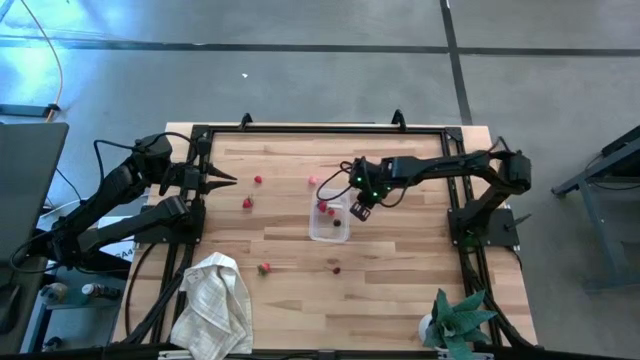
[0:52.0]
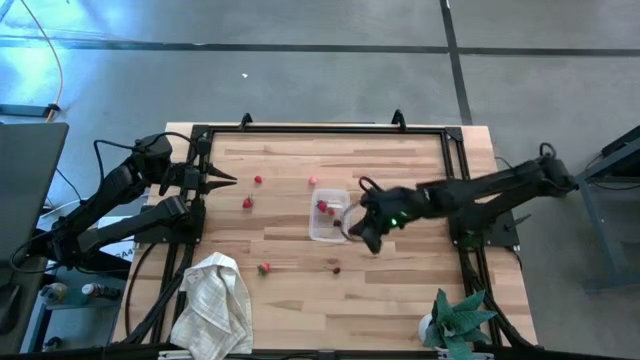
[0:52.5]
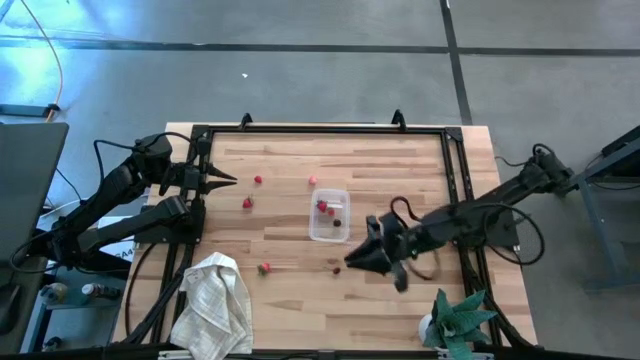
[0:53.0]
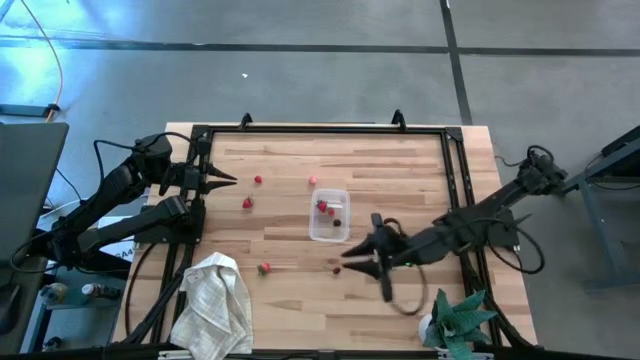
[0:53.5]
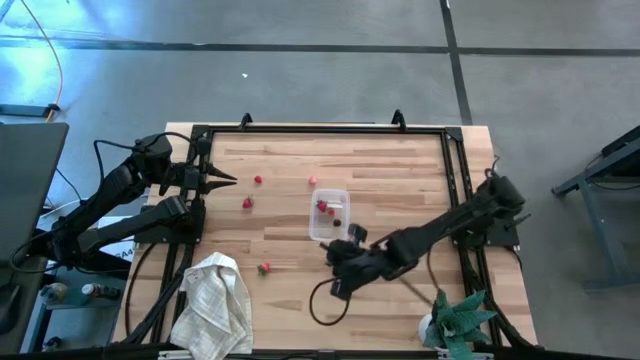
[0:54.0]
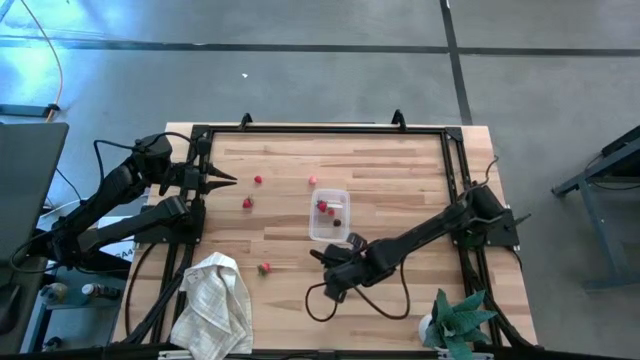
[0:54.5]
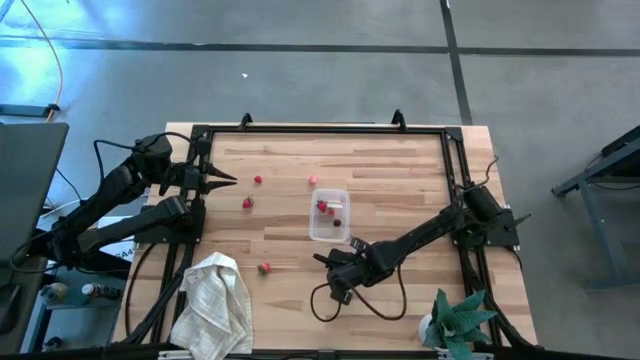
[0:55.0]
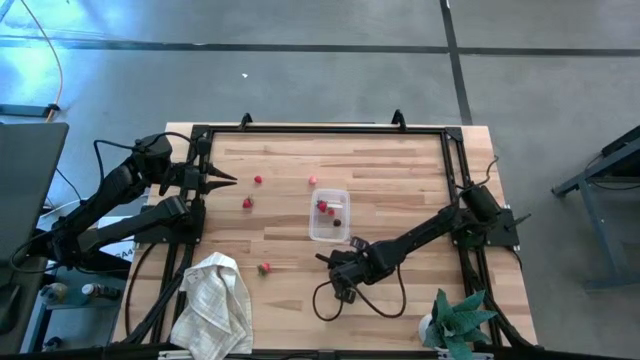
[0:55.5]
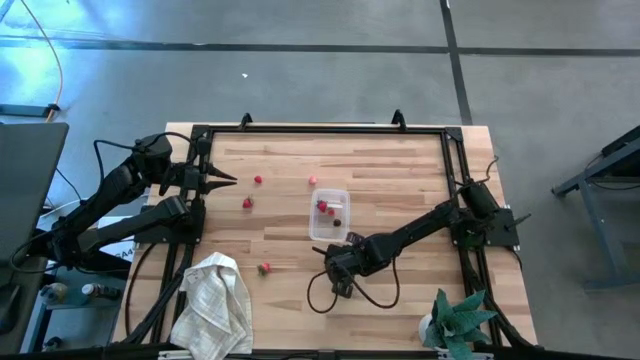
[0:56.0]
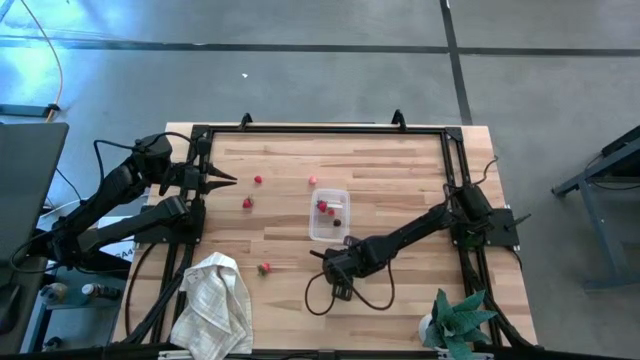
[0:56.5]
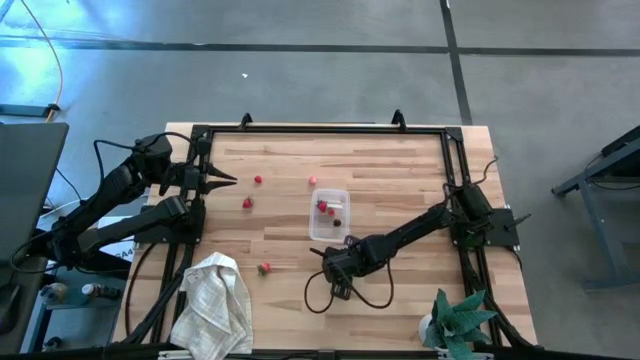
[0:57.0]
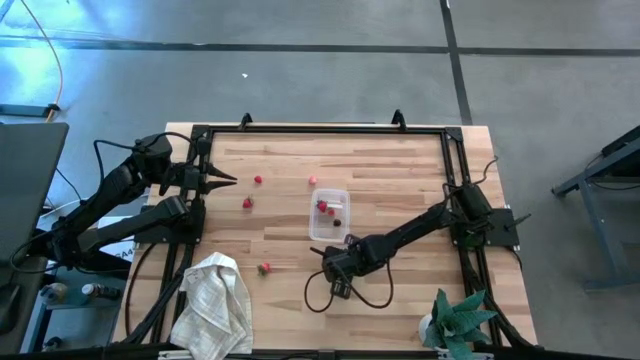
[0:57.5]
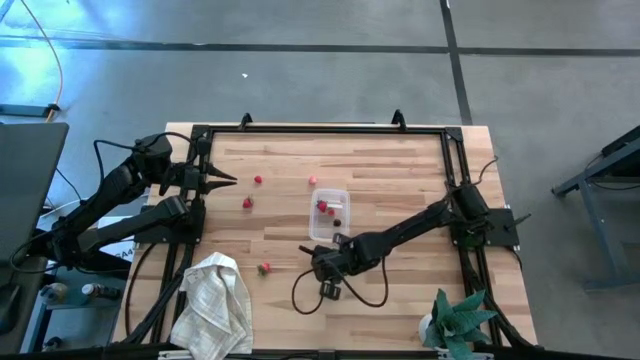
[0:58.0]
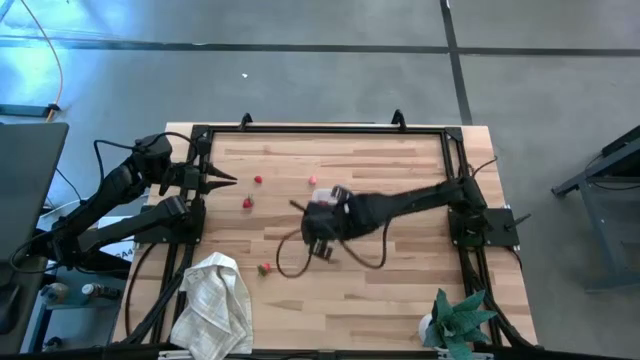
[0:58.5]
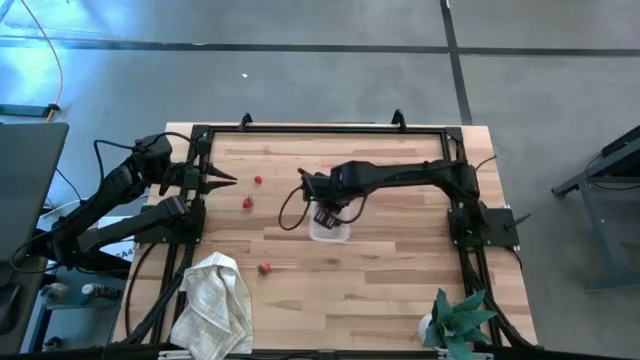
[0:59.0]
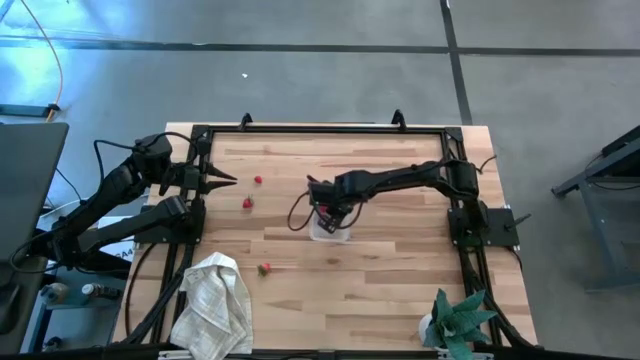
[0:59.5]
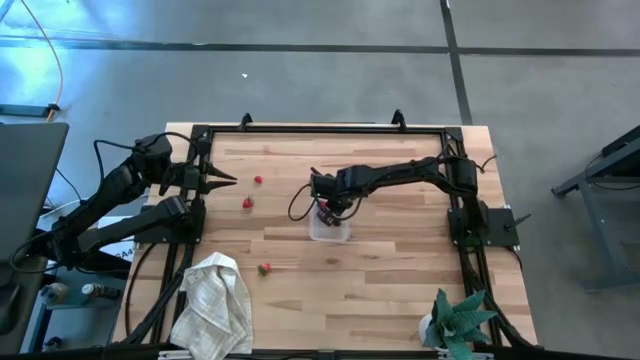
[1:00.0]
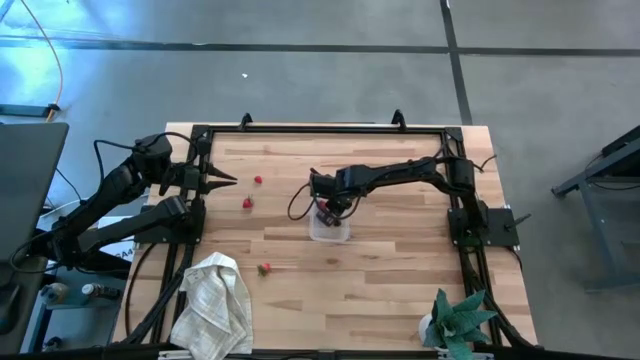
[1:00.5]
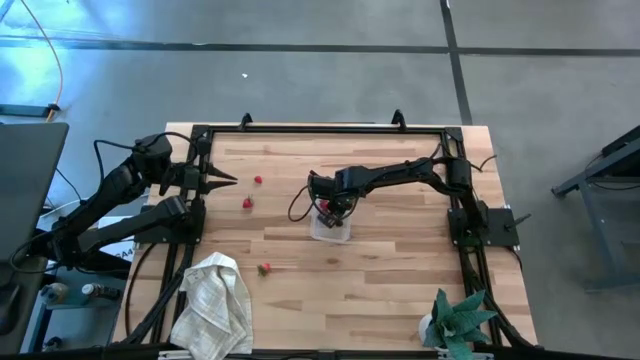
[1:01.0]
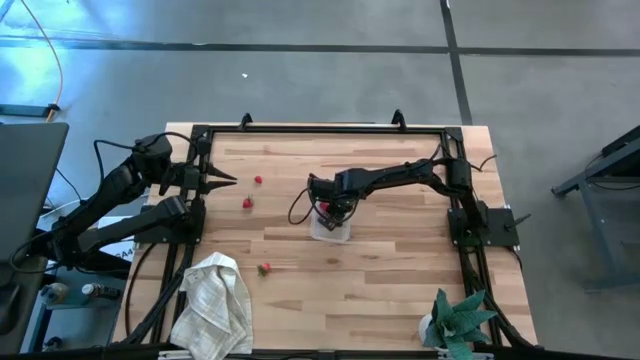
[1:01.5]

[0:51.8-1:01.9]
Task: Pick and placing Produce into tupperware
Put the red cherry into the transparent bin

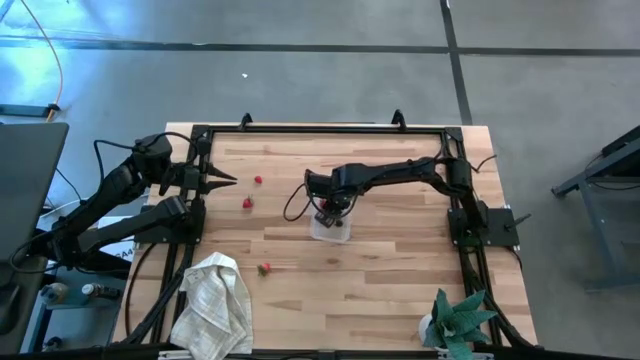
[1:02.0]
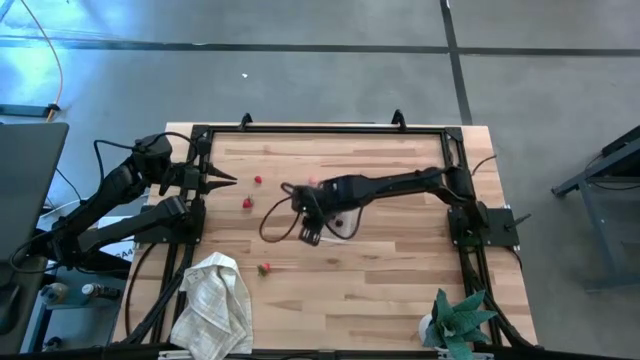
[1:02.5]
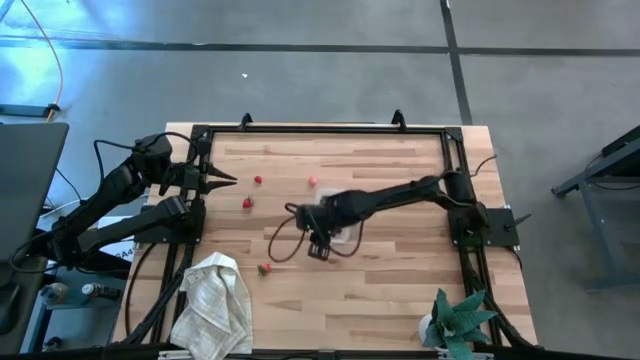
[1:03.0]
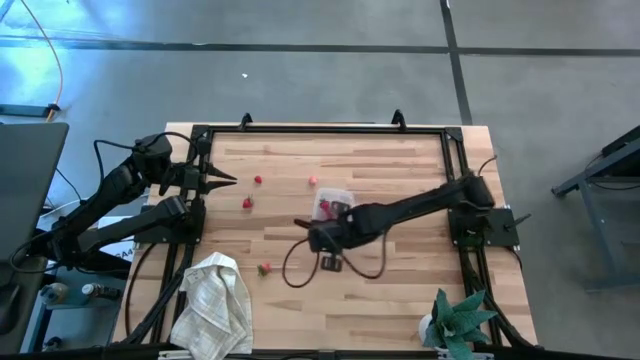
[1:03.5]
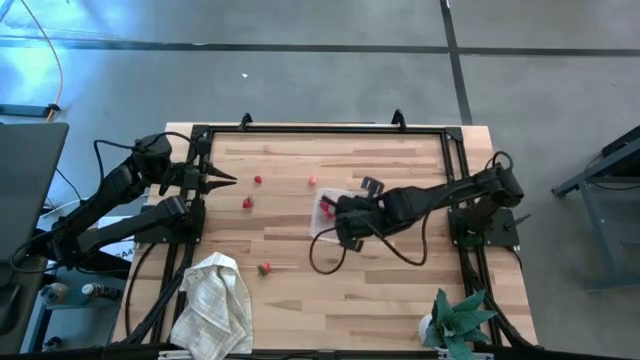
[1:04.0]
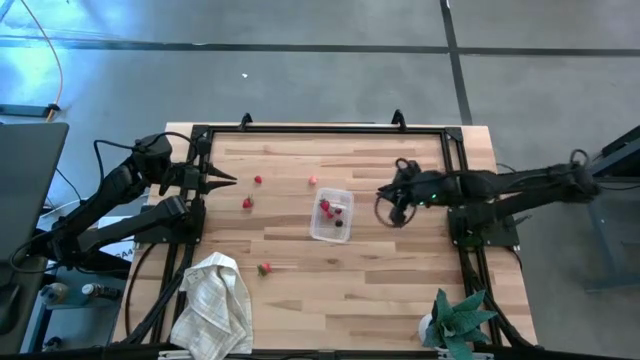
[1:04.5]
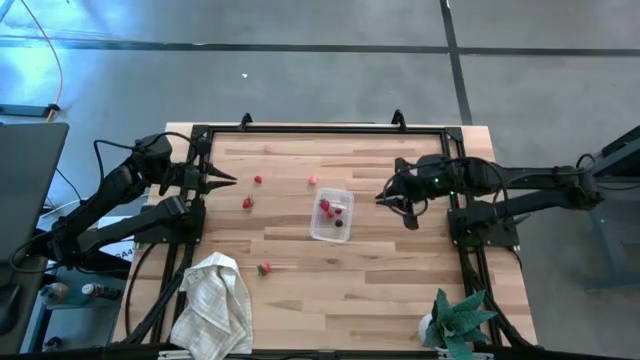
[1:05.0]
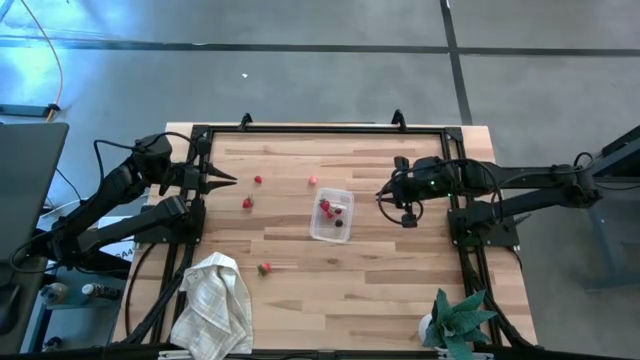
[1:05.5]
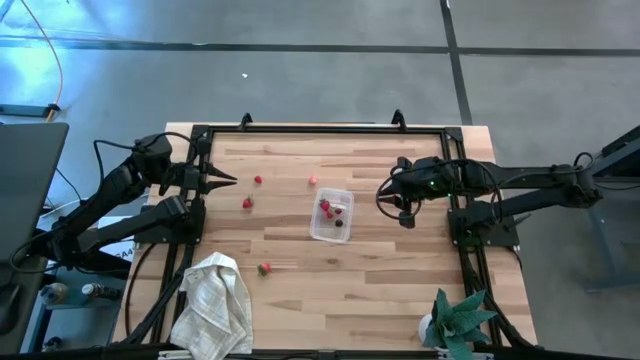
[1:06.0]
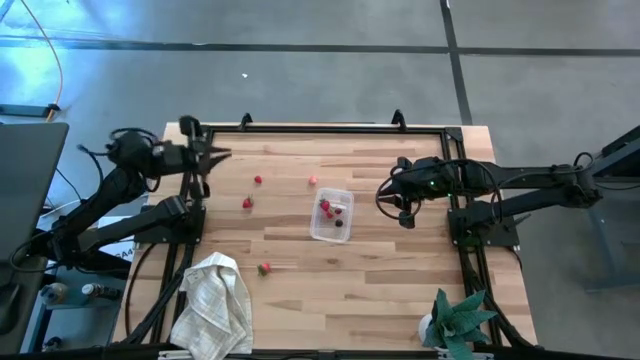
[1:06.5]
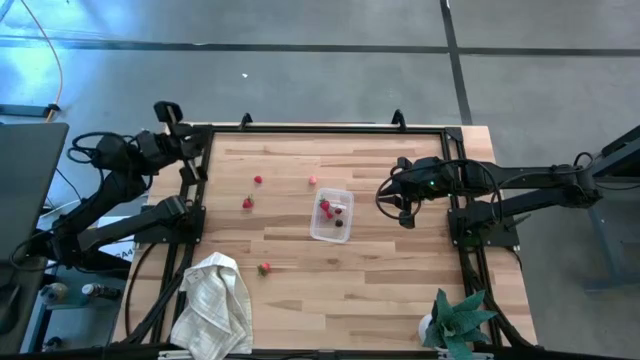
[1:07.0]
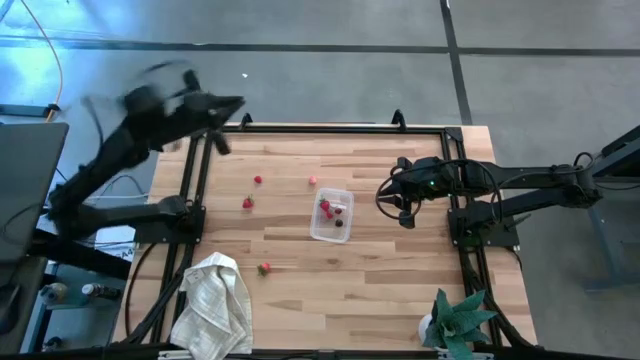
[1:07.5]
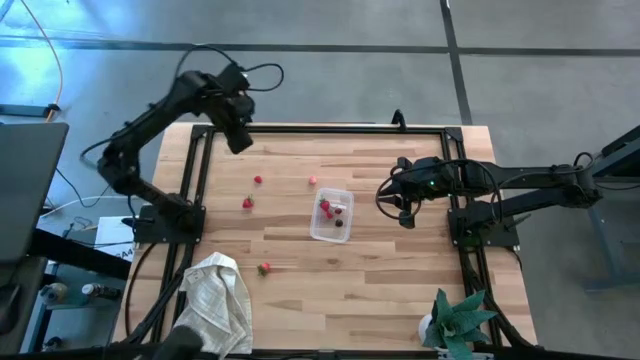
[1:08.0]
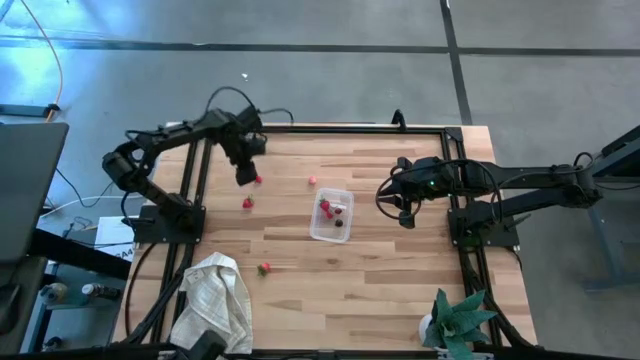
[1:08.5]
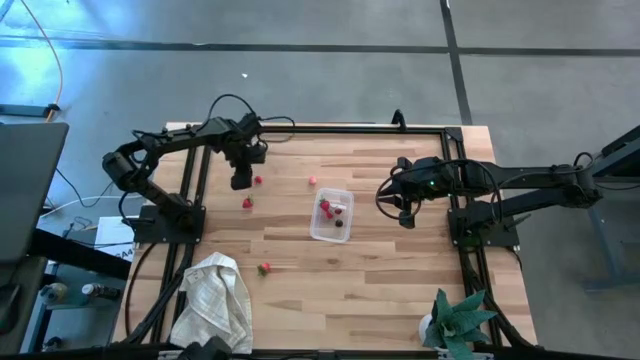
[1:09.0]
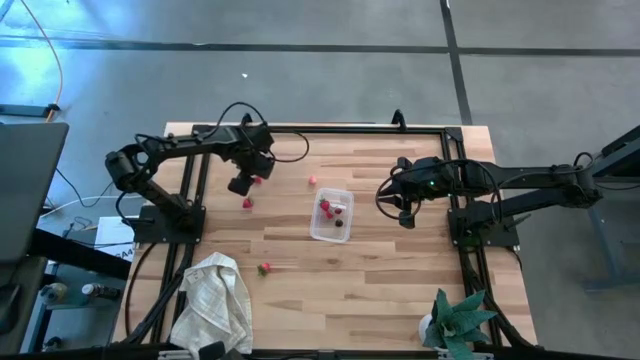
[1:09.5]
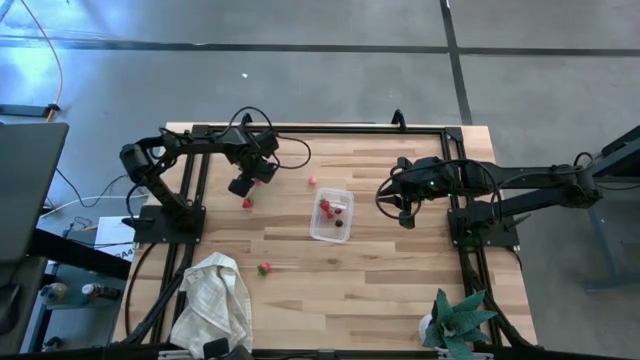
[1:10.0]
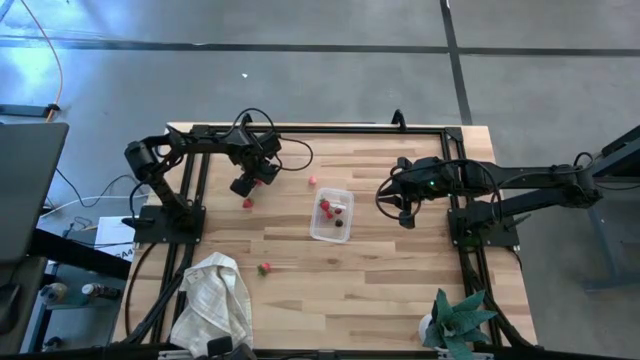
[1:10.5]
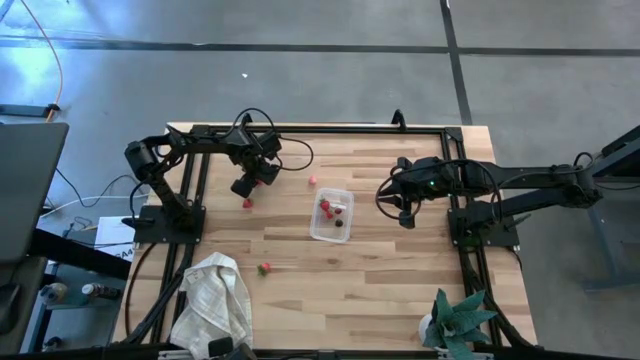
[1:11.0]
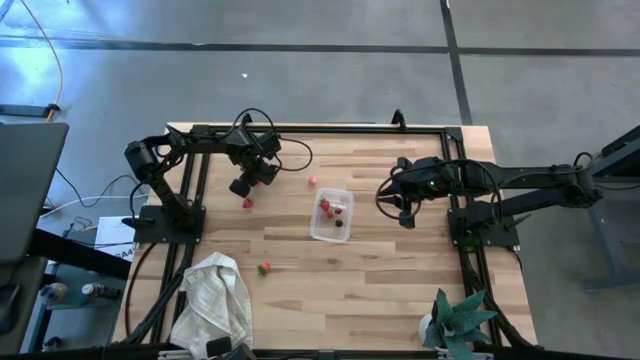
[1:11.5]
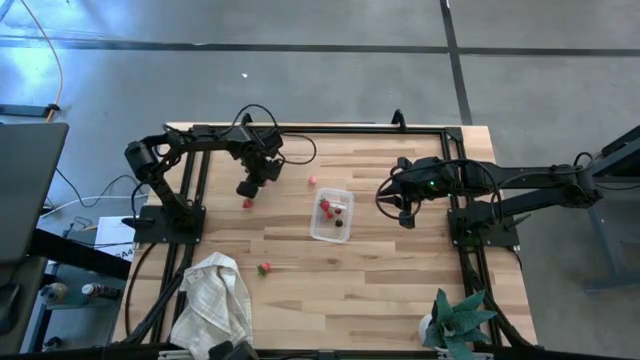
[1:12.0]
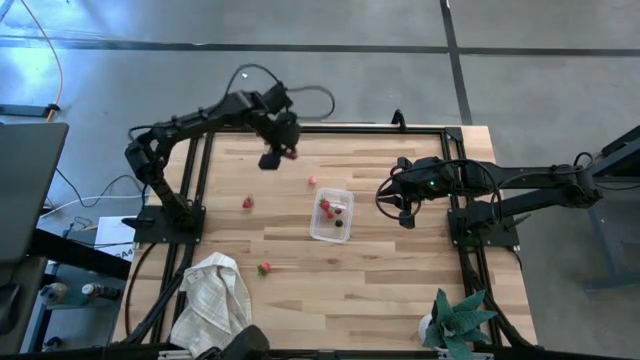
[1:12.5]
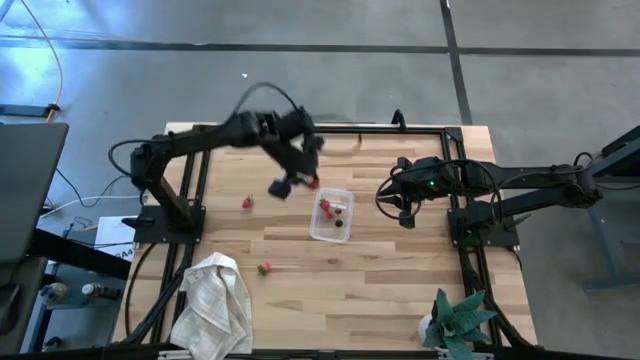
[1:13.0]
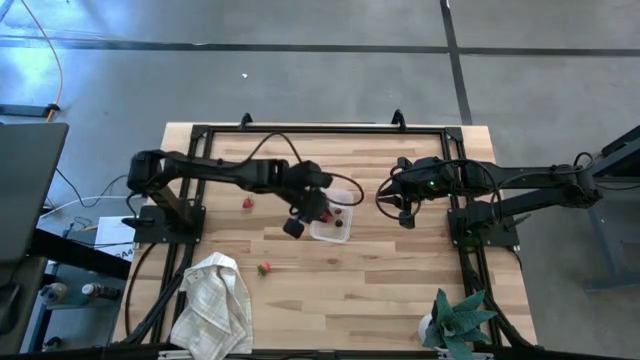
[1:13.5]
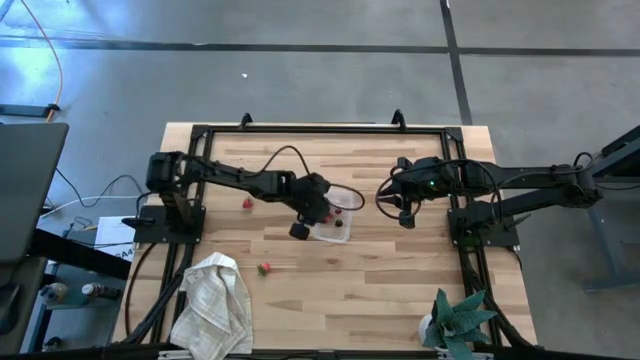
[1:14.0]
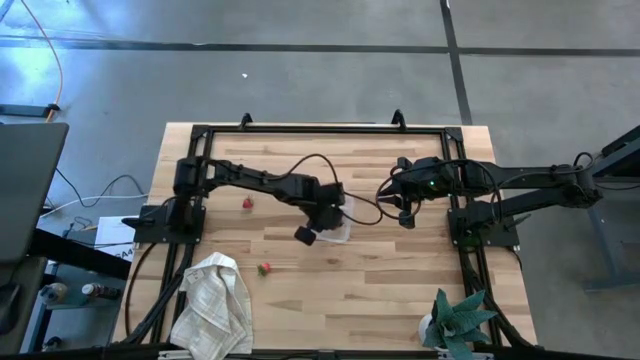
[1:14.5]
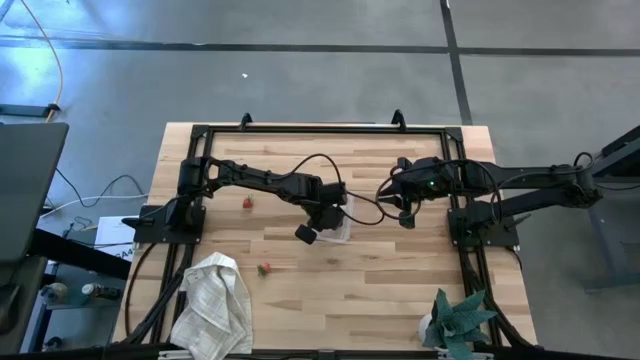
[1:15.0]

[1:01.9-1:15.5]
Put the raspberry into the transparent bin
